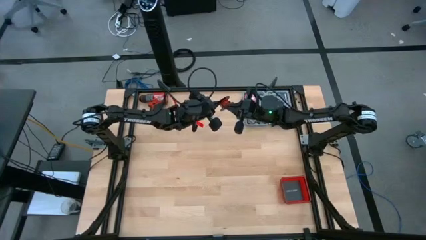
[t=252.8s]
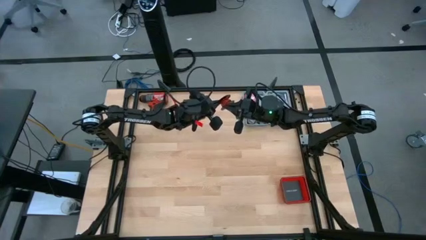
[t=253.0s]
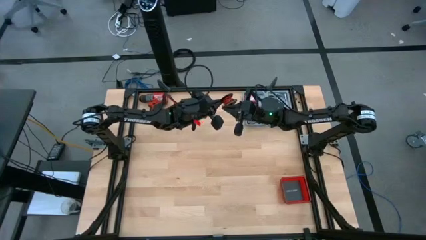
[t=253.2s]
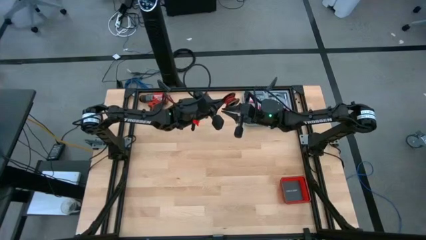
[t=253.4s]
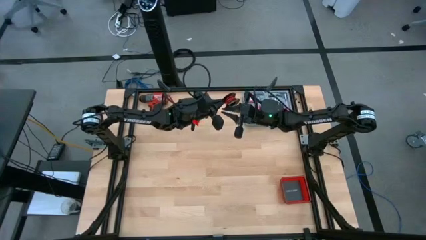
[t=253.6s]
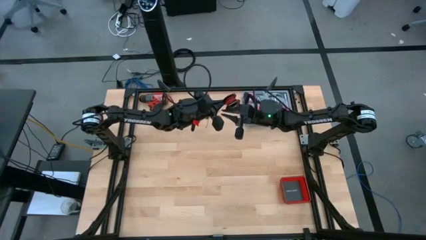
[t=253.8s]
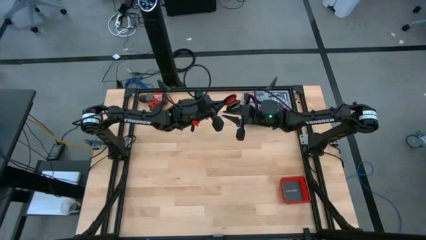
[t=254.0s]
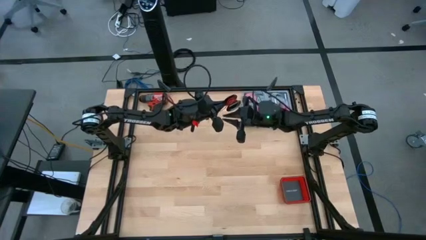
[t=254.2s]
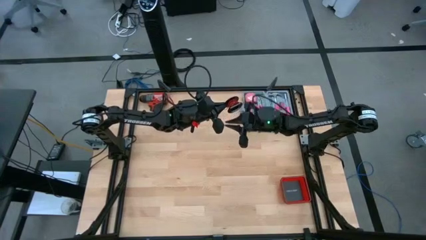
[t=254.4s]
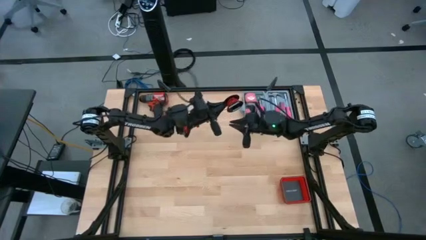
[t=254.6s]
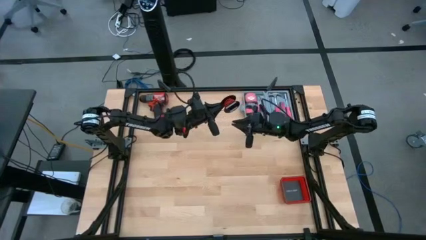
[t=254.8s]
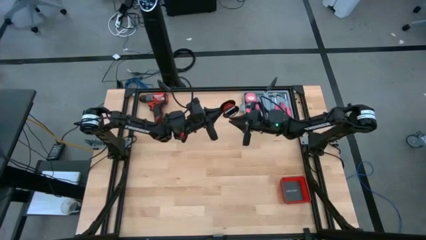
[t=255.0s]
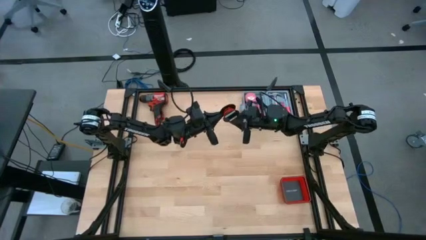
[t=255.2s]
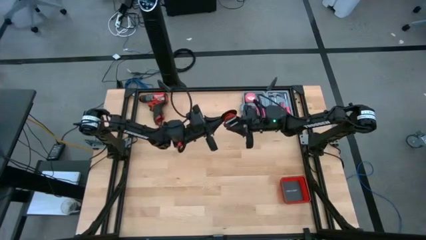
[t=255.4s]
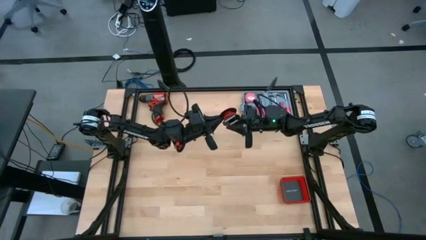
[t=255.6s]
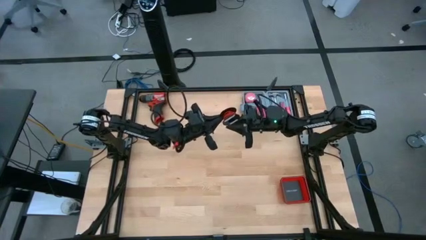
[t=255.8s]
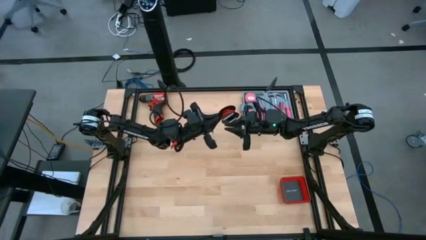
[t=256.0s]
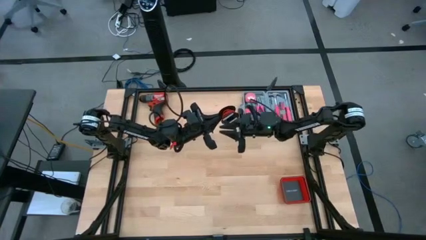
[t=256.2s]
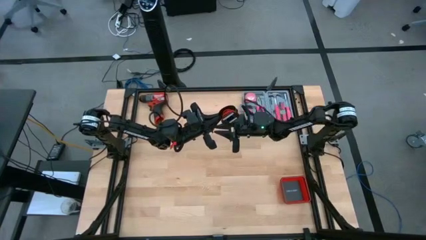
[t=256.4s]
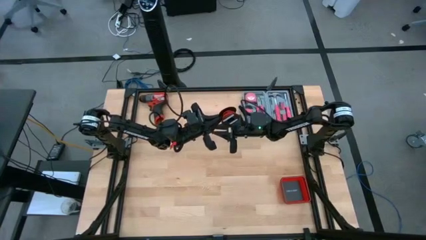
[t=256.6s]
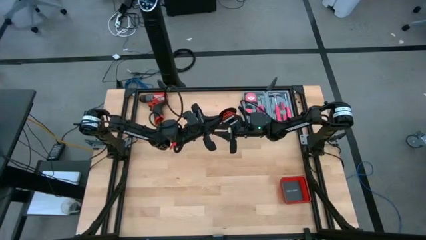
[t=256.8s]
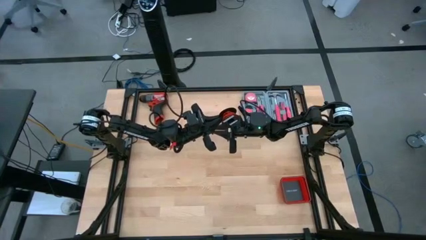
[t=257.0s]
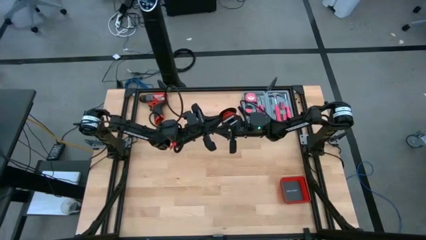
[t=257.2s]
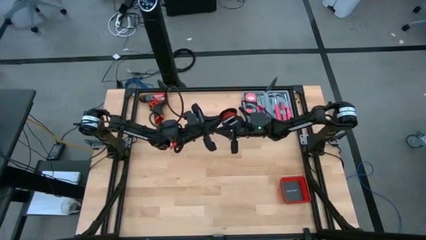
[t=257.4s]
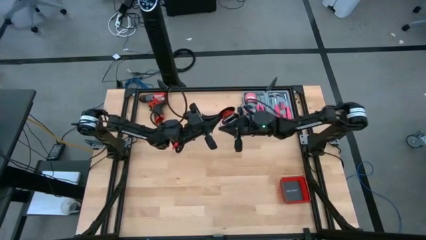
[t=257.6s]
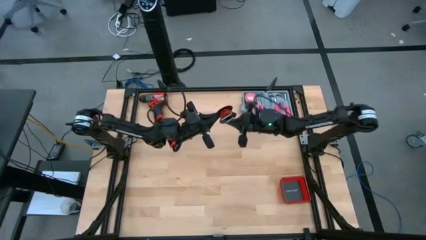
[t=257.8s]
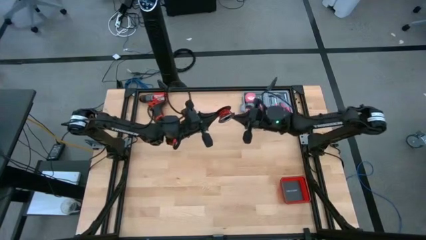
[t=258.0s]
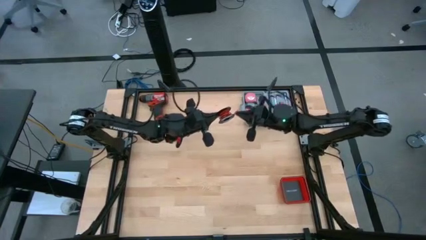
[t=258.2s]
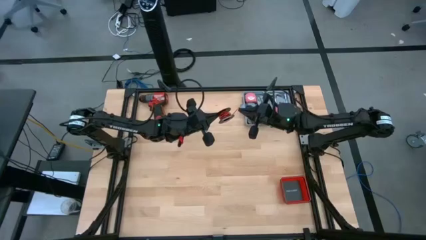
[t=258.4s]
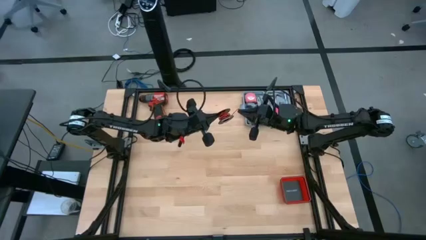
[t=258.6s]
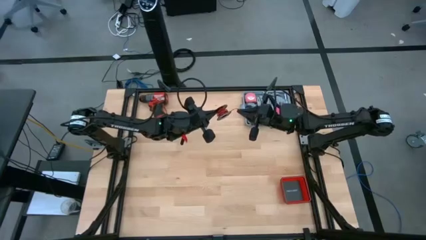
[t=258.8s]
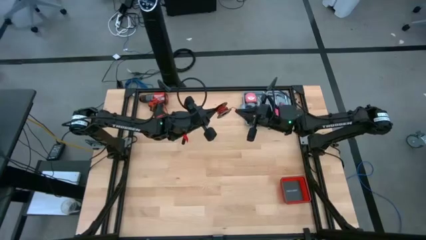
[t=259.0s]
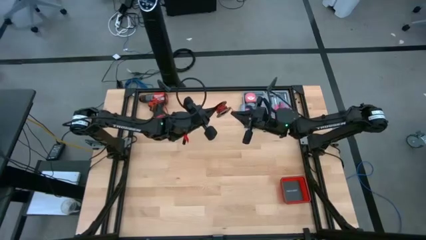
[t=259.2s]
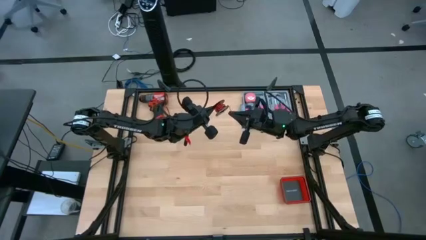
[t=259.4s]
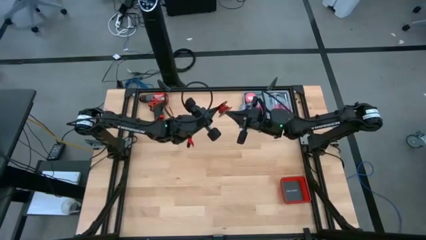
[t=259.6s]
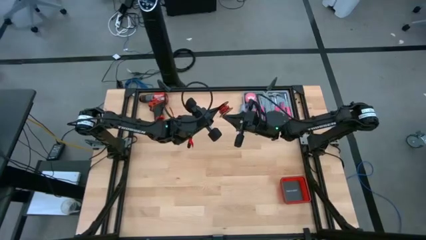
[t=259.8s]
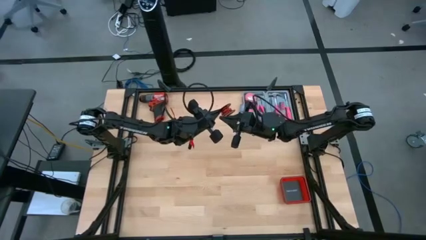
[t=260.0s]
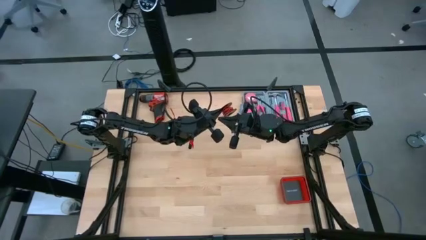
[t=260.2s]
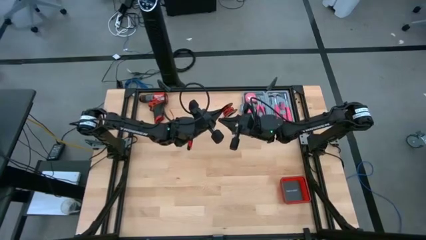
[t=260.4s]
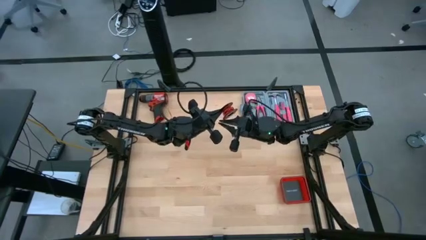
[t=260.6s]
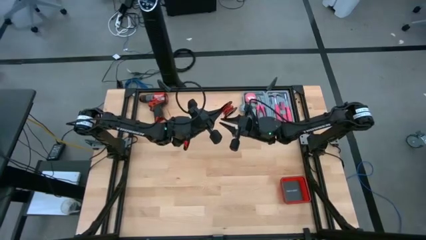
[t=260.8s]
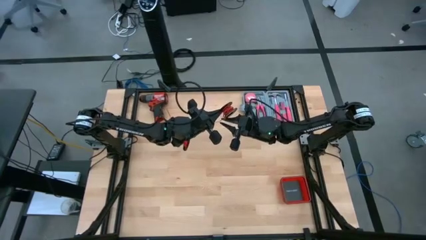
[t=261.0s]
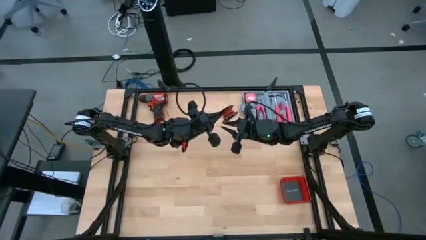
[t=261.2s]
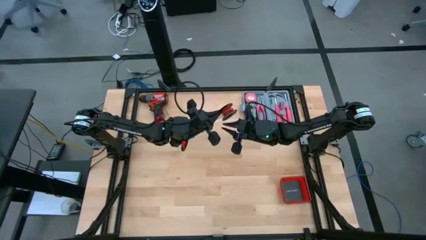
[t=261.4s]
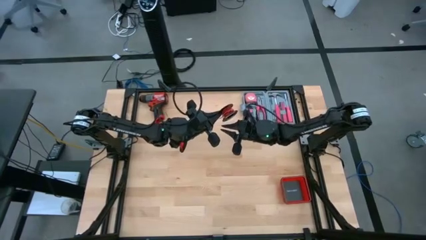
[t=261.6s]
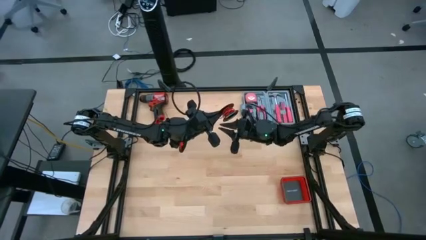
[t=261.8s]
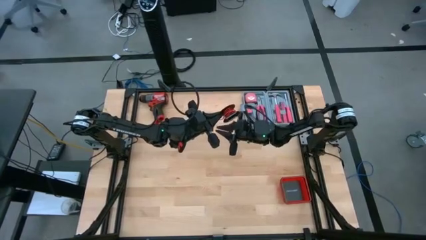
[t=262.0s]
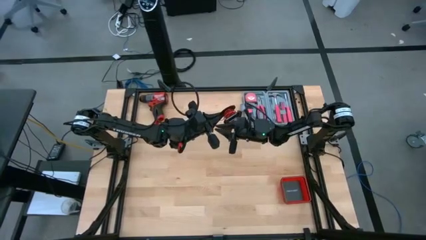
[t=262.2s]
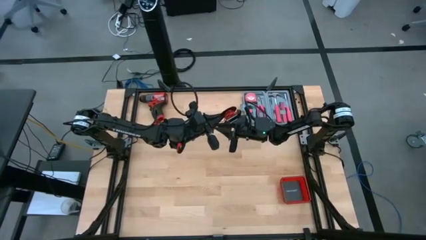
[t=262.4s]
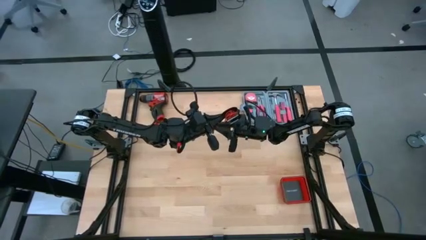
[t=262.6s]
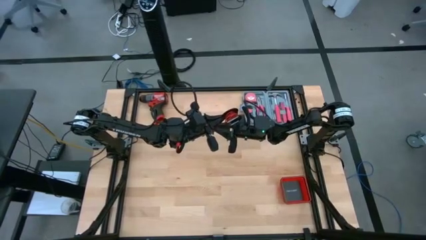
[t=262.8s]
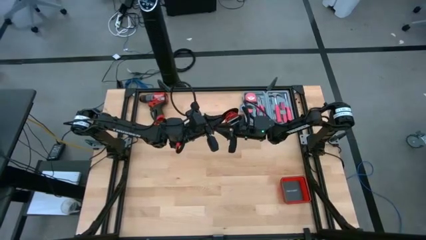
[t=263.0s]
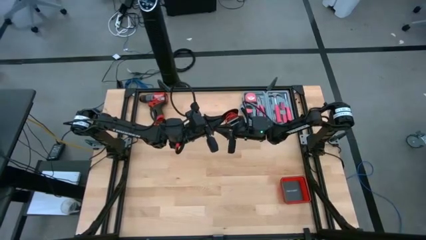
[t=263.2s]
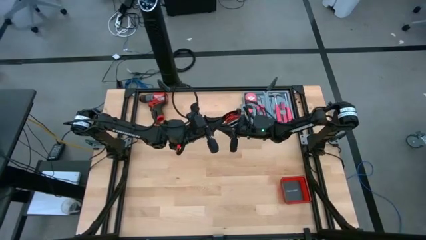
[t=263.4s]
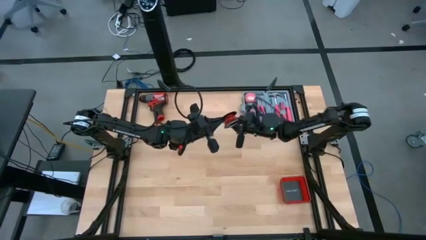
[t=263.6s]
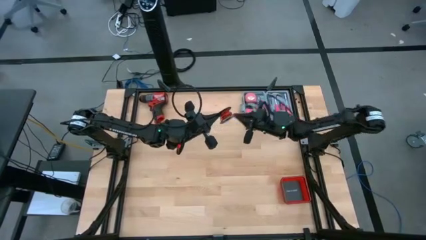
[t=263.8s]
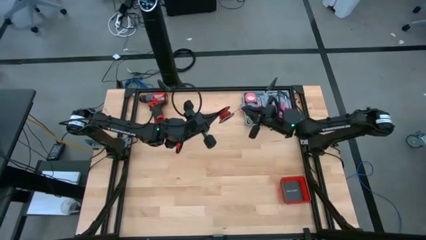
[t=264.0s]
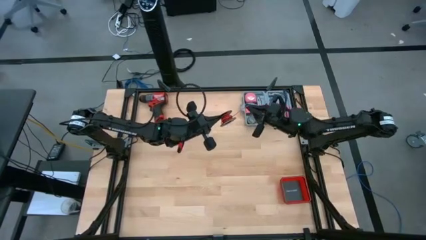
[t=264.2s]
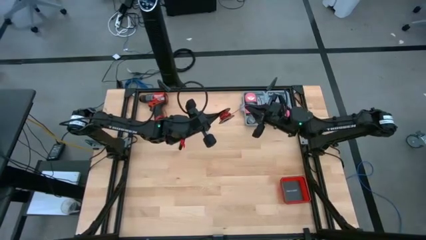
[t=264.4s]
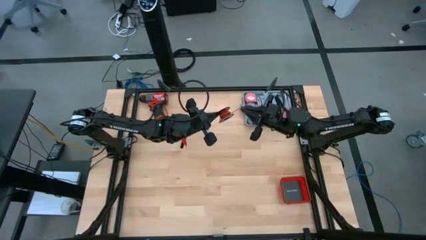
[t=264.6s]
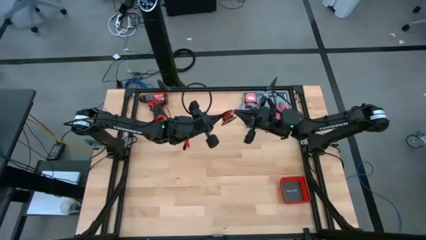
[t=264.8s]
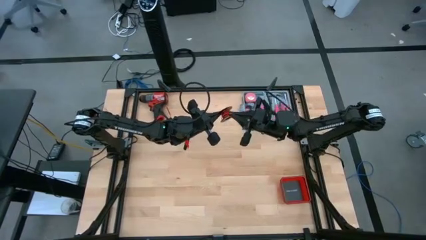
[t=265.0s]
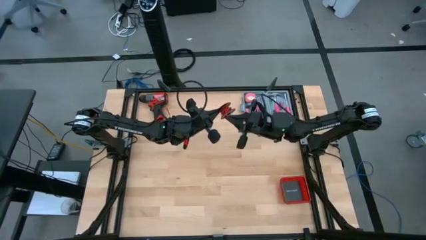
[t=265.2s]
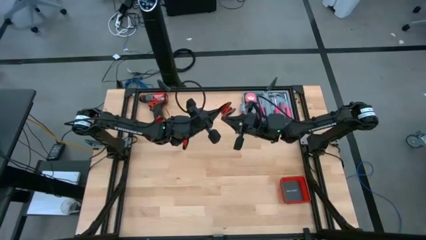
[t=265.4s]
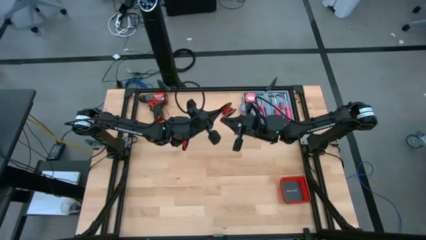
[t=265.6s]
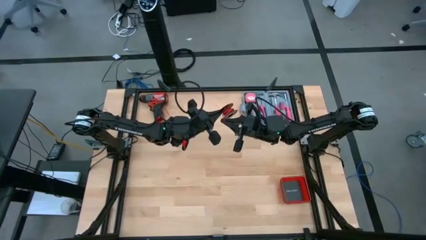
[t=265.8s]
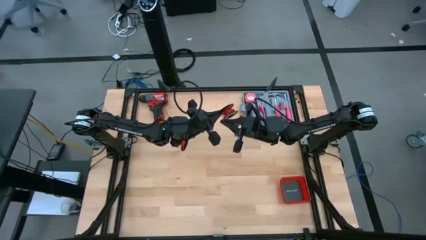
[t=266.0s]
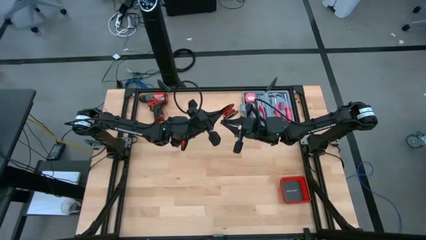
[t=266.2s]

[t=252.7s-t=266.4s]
Task: Coil cords
Coil the red wire on the black spool

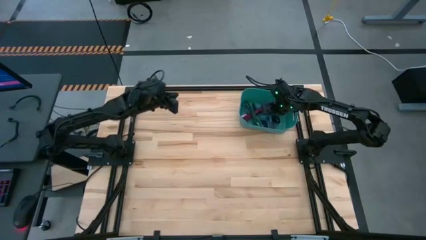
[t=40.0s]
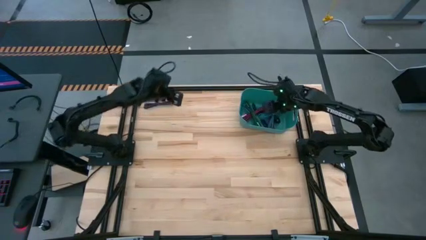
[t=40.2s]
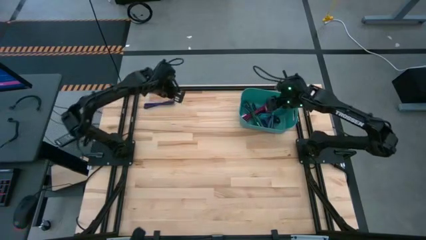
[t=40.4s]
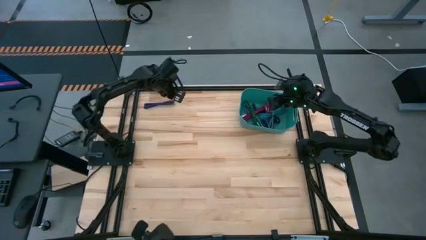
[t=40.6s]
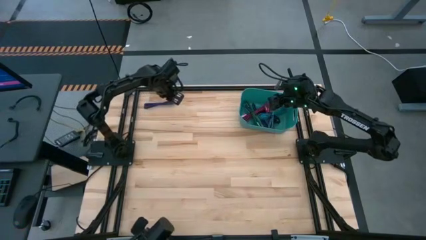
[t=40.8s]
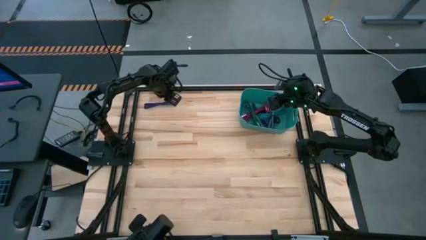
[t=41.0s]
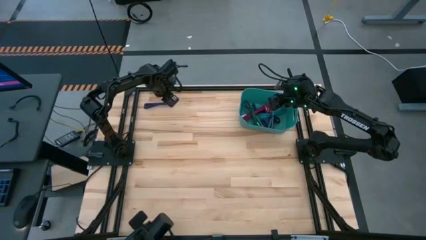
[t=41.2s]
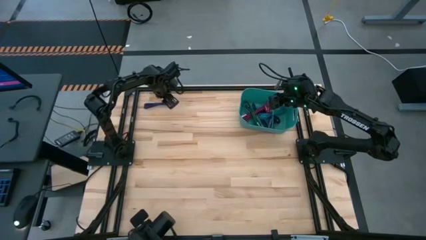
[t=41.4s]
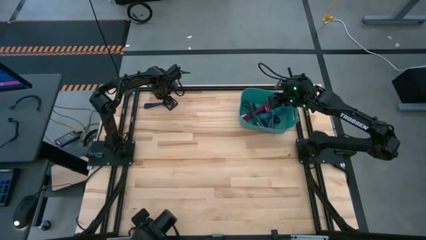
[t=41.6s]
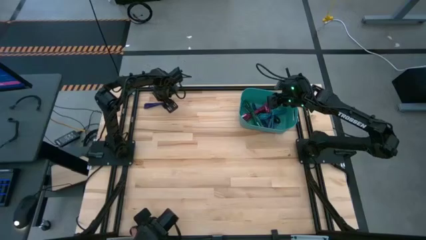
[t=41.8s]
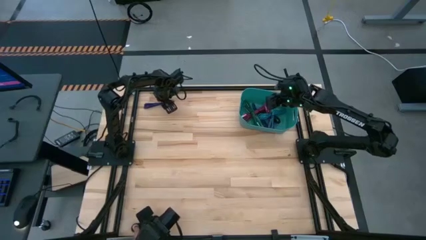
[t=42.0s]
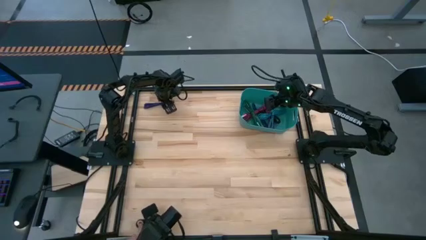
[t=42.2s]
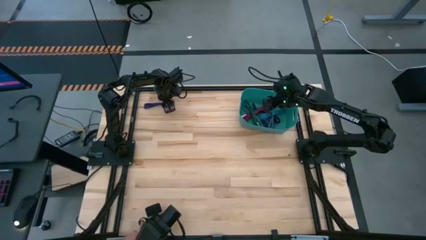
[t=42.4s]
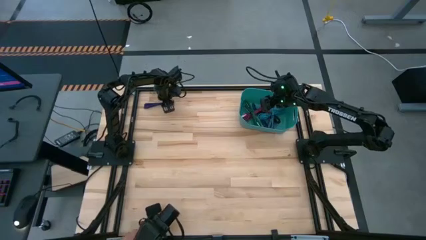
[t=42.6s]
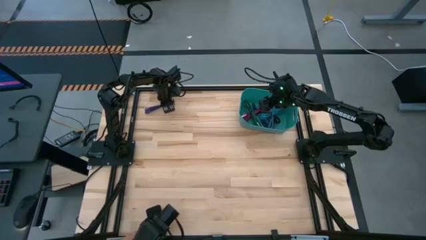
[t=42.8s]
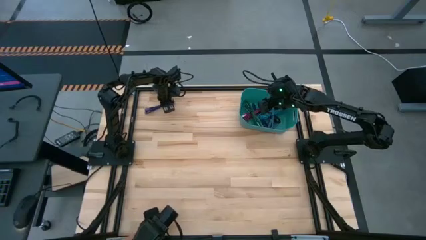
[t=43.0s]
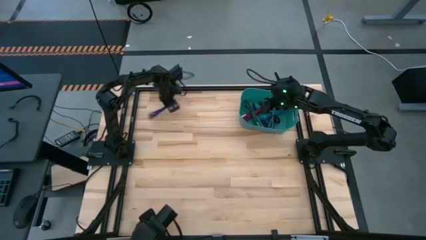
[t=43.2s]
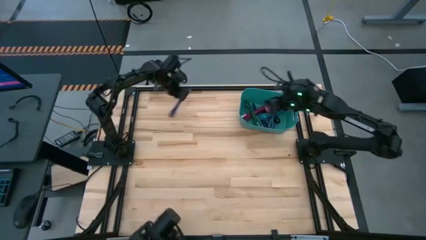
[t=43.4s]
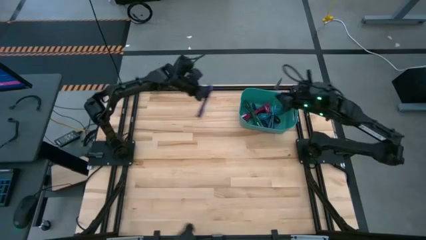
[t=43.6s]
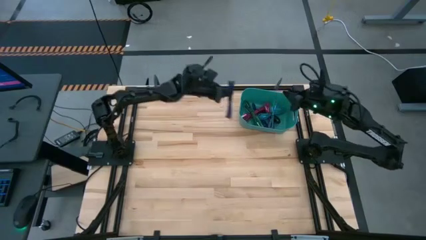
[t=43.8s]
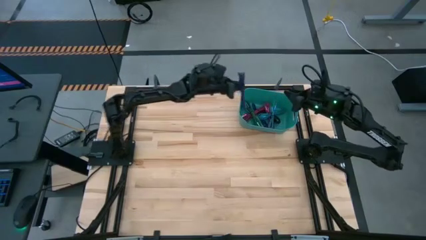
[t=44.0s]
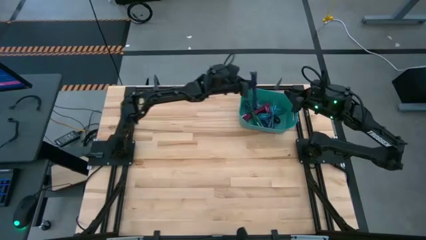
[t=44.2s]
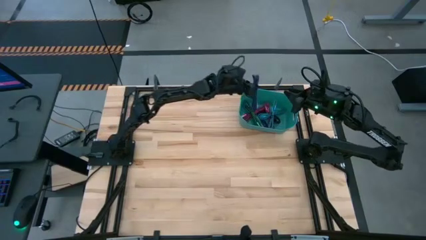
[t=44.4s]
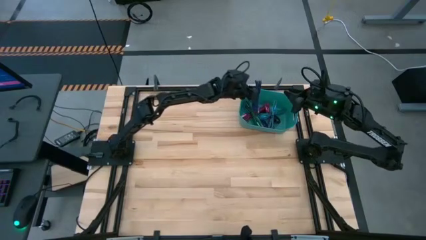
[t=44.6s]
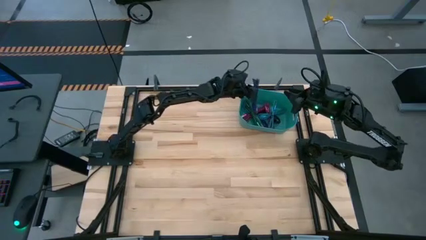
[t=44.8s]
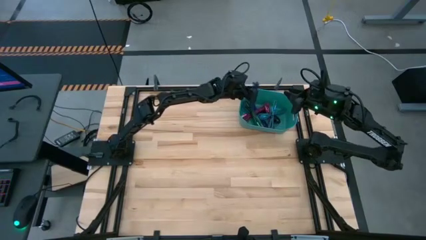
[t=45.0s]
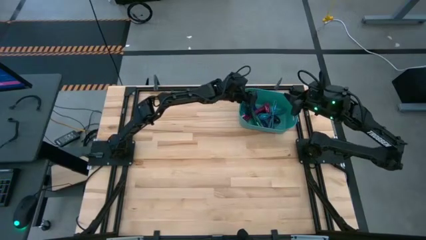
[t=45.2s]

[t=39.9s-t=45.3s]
Task: Pick and place USB-C Cables
Put the purple charger cable into the light blue bin
